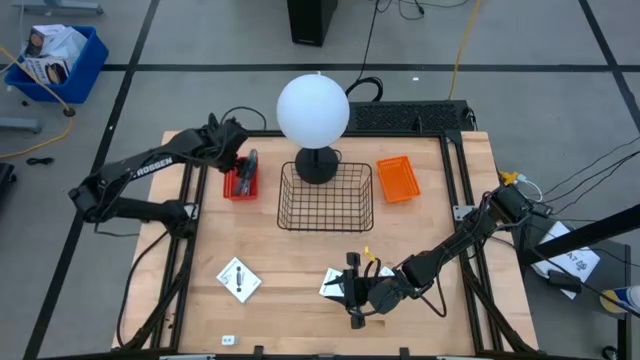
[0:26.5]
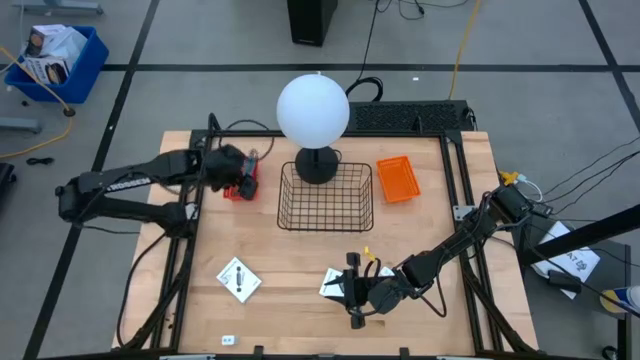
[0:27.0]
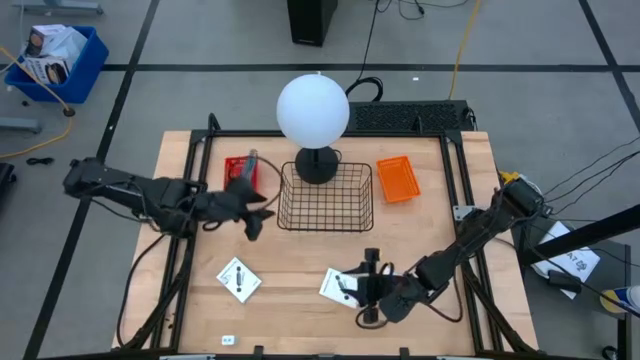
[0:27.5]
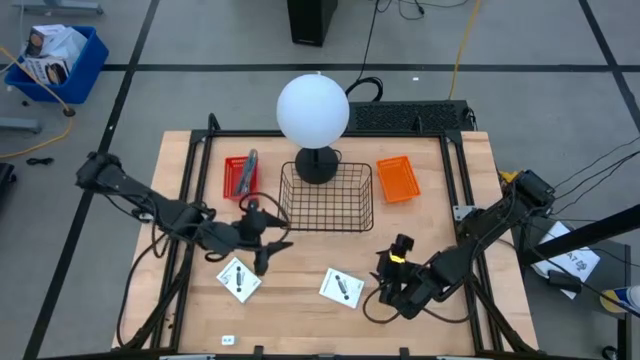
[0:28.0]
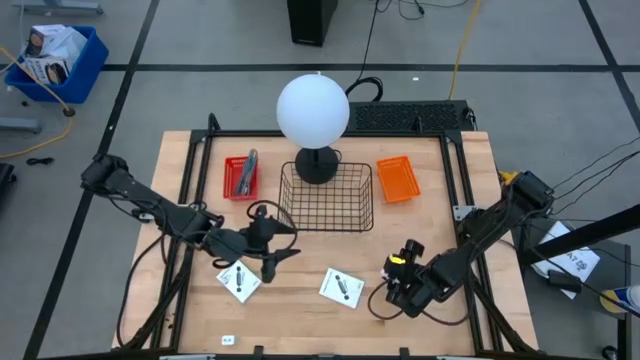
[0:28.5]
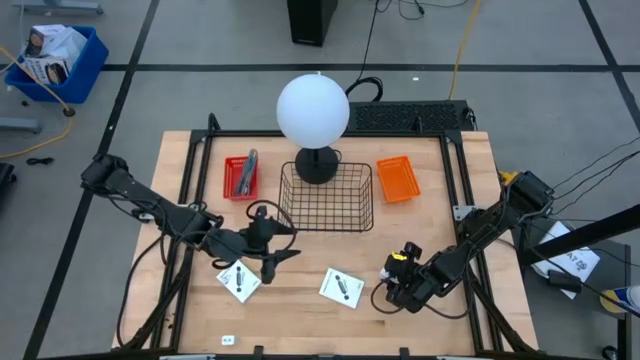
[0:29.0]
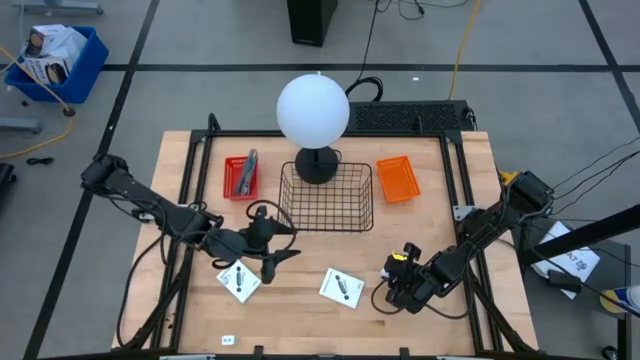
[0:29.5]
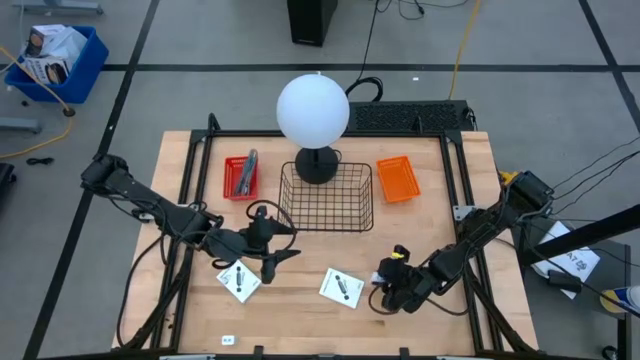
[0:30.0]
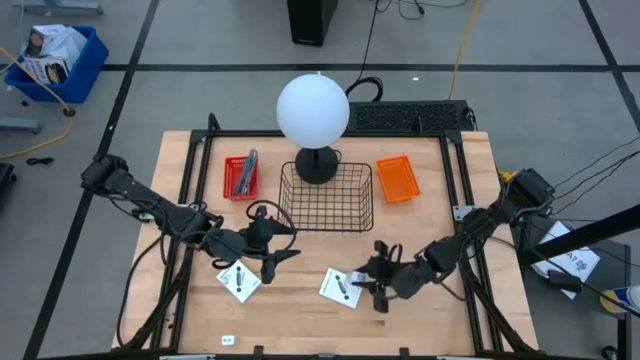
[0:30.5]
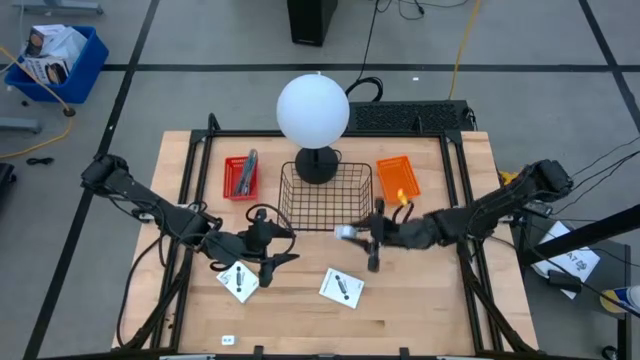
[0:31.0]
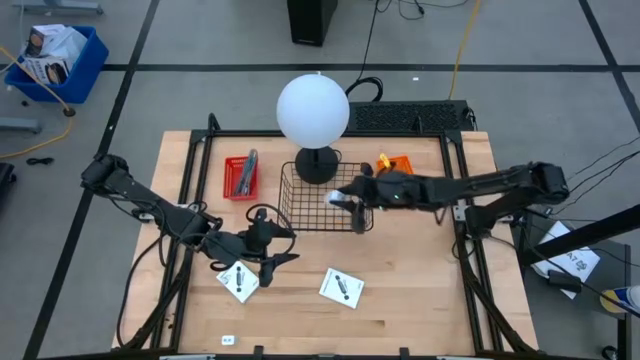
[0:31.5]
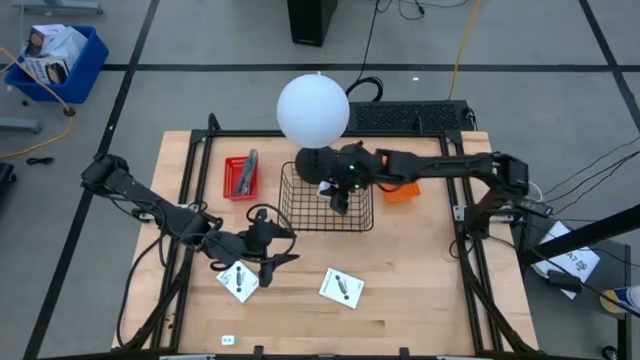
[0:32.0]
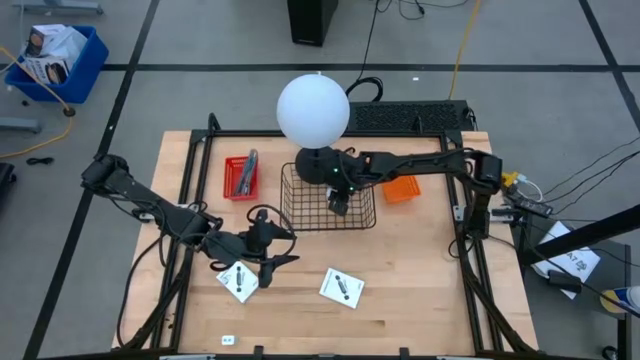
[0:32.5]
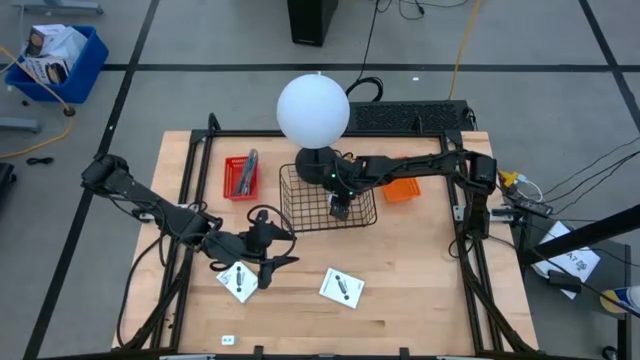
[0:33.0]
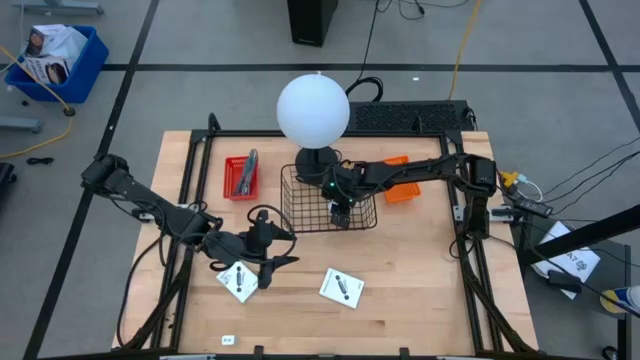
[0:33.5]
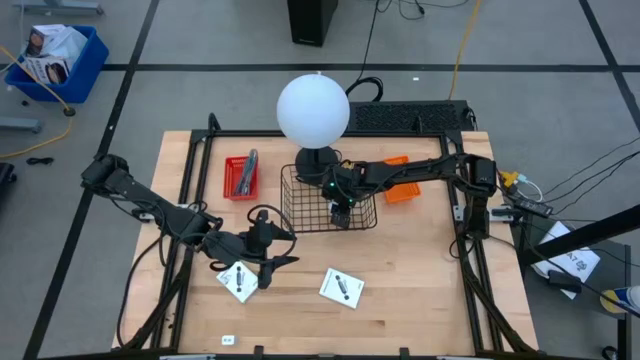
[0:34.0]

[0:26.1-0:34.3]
Task: Pick and place items into bin
Put the top white charger adapter into the black wire basket

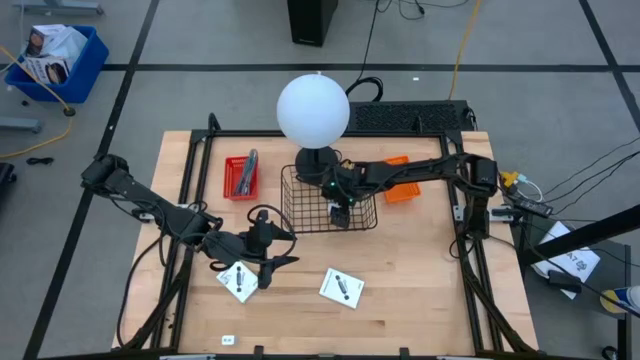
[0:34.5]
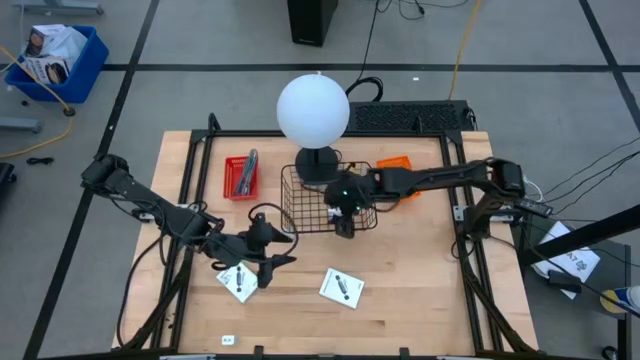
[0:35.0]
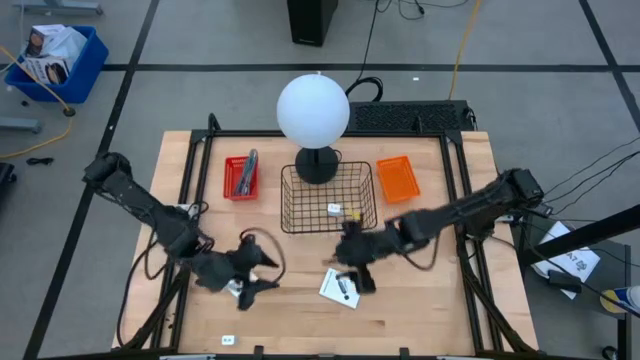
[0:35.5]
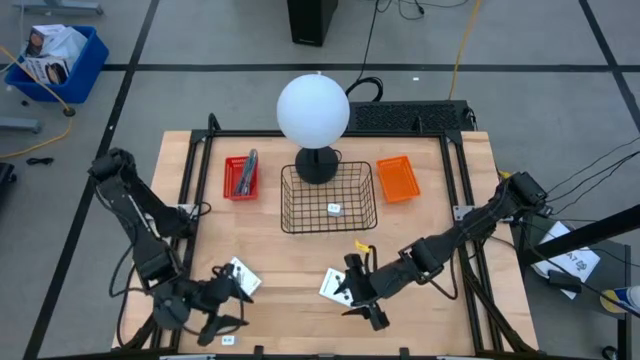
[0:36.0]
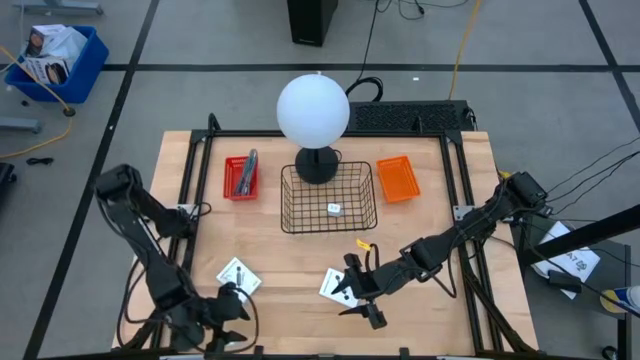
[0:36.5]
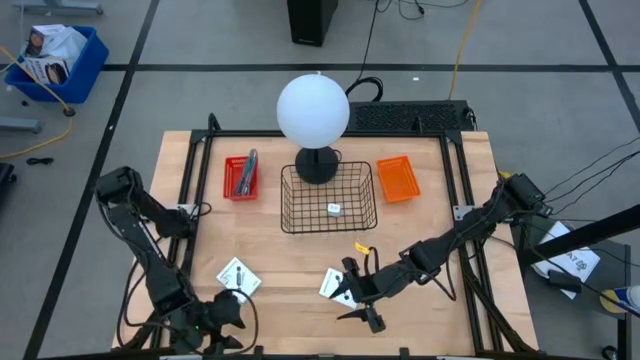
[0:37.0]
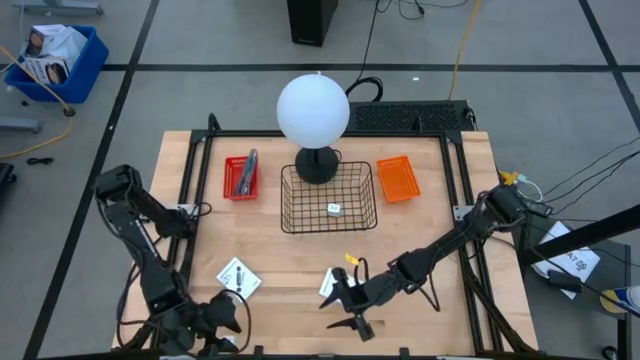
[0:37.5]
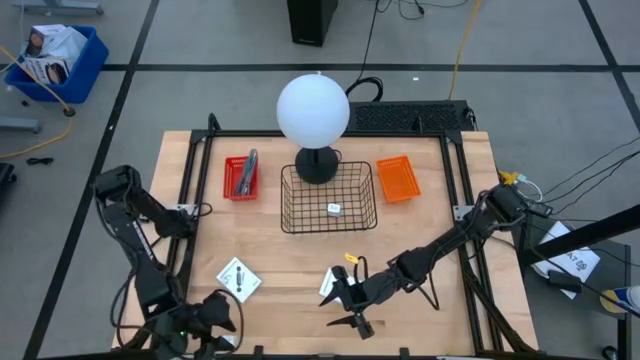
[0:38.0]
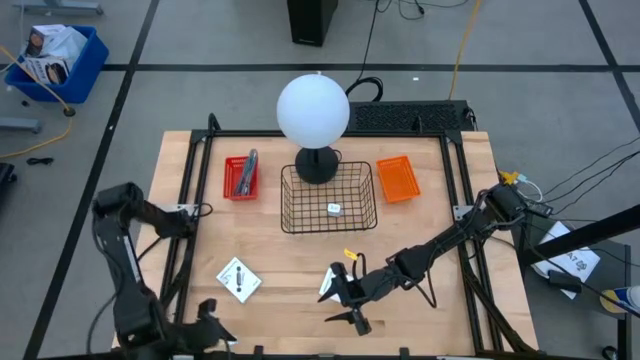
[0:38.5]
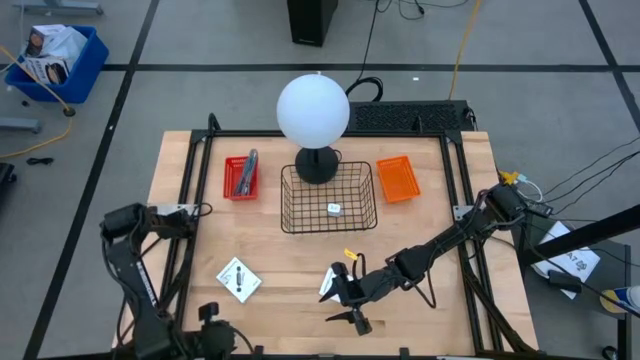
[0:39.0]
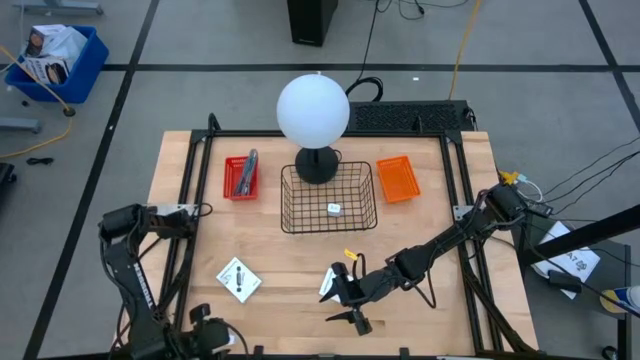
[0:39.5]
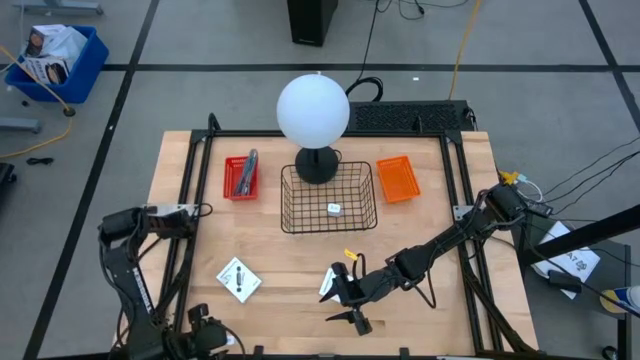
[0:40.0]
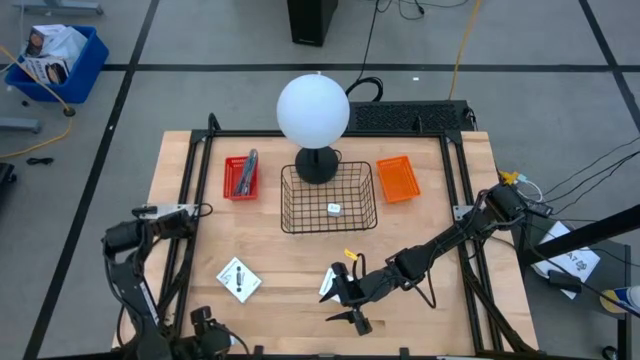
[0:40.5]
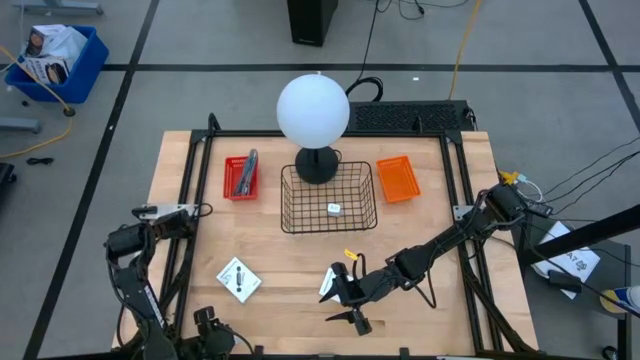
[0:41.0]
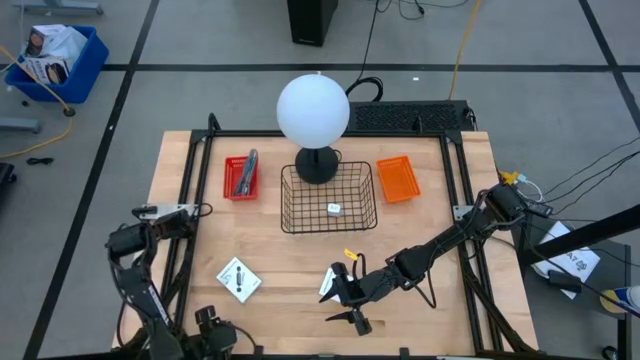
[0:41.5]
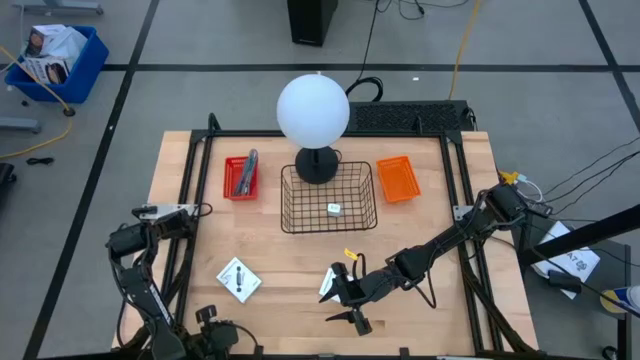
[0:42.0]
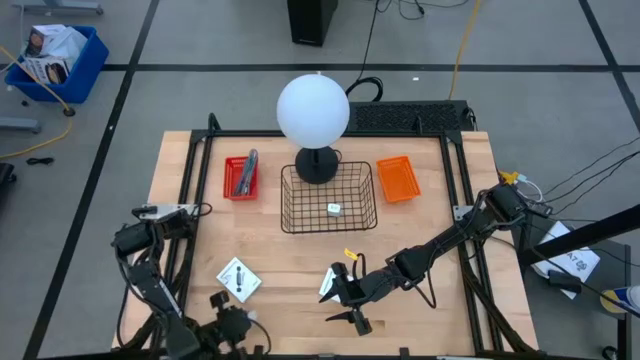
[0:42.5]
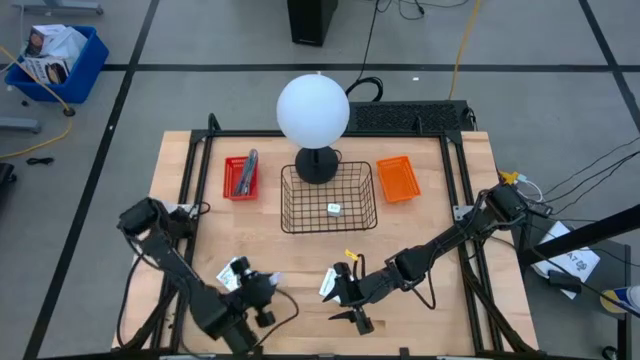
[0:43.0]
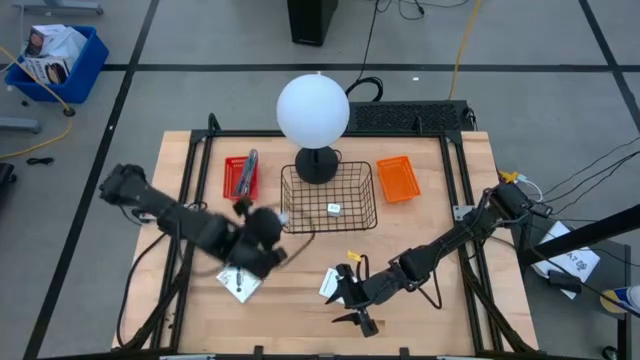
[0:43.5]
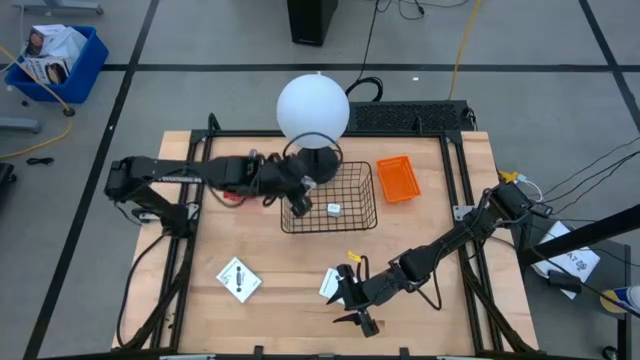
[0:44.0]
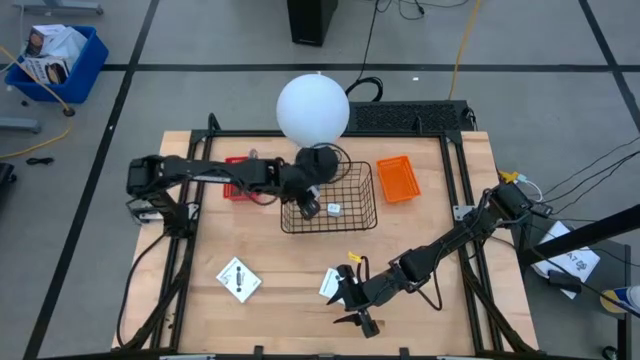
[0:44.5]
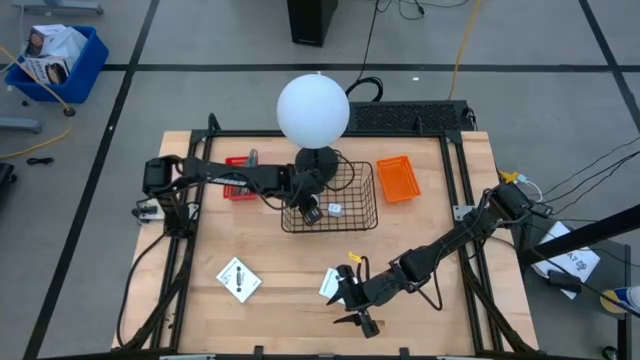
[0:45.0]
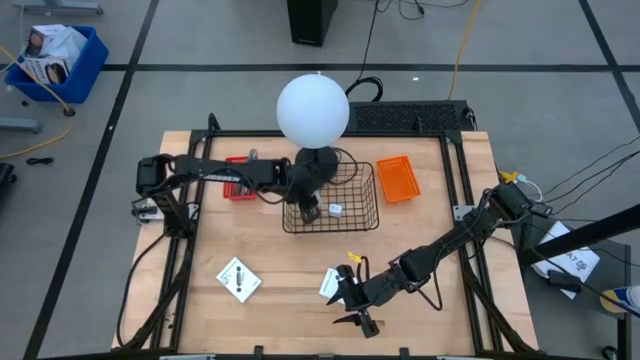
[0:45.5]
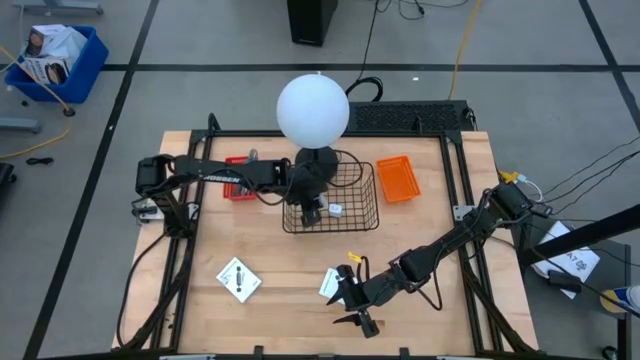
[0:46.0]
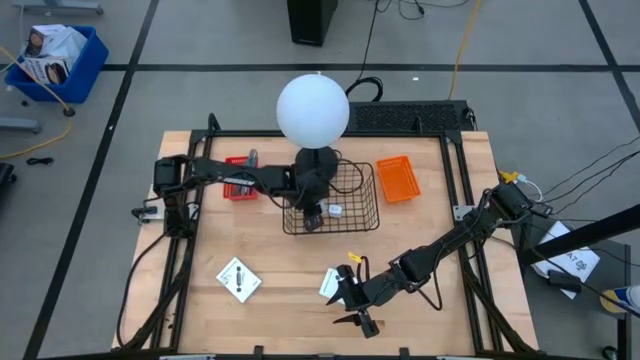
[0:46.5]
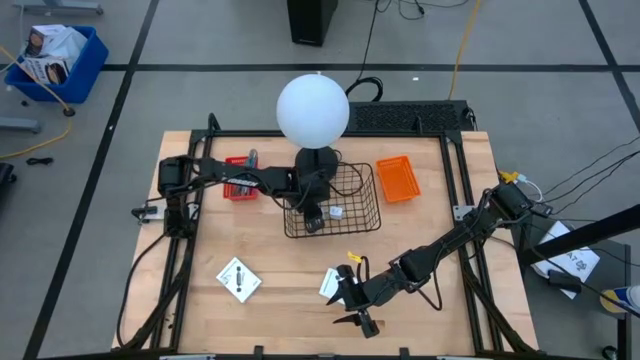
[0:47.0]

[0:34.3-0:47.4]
Put the white charger adapter into the black wire basket
